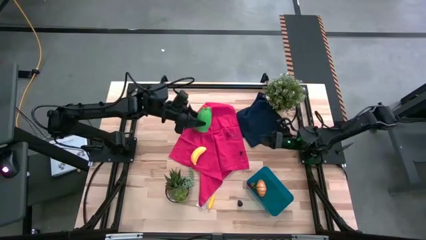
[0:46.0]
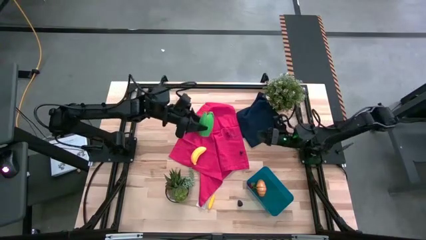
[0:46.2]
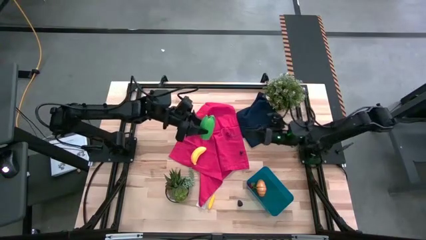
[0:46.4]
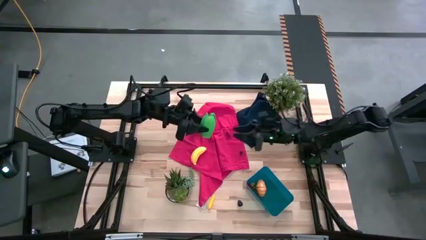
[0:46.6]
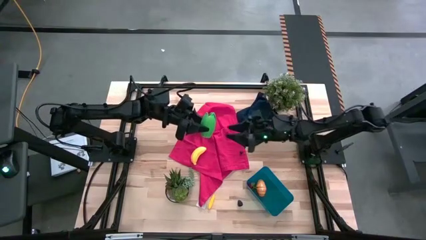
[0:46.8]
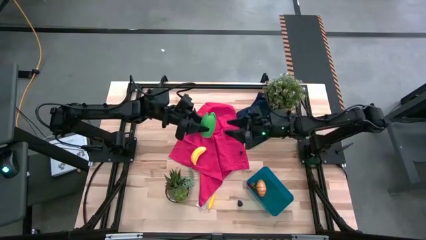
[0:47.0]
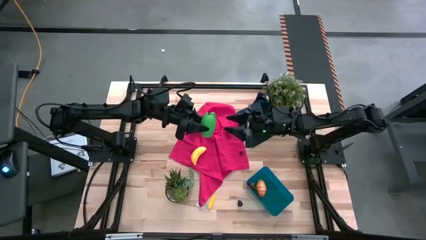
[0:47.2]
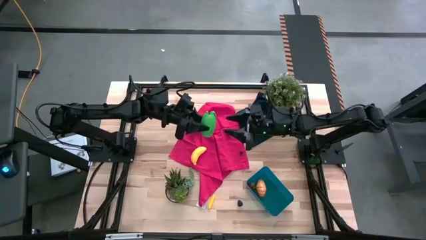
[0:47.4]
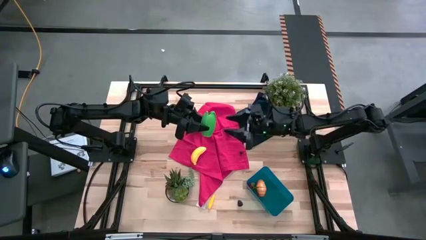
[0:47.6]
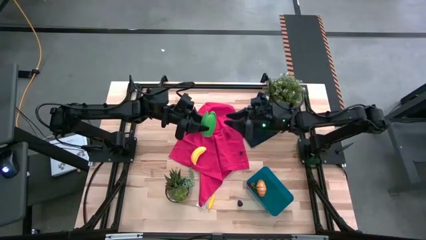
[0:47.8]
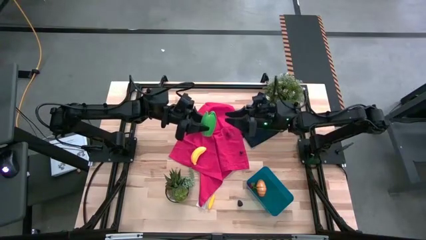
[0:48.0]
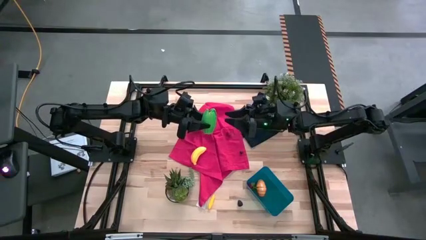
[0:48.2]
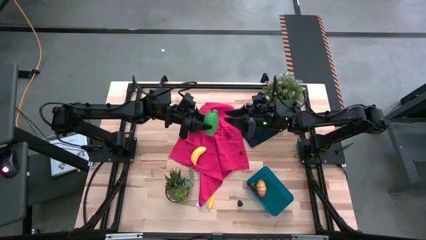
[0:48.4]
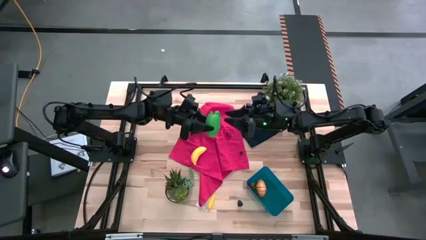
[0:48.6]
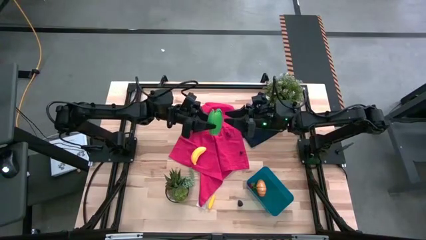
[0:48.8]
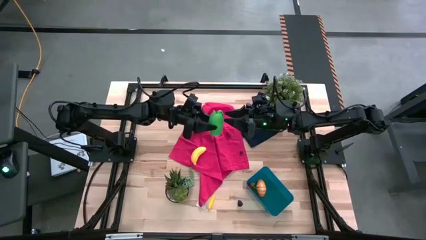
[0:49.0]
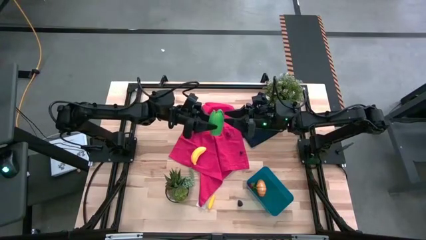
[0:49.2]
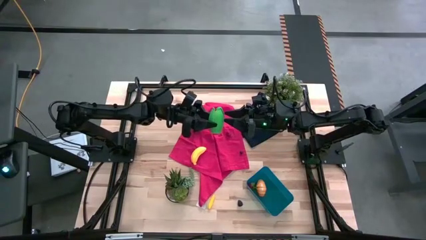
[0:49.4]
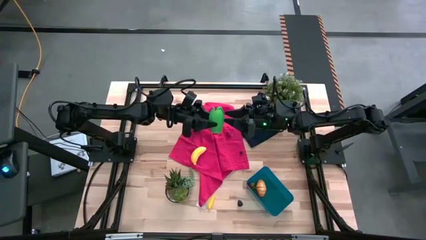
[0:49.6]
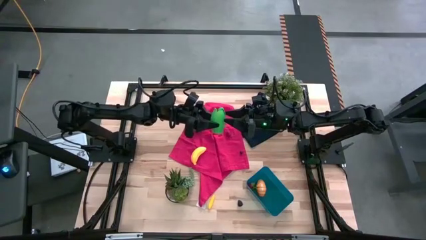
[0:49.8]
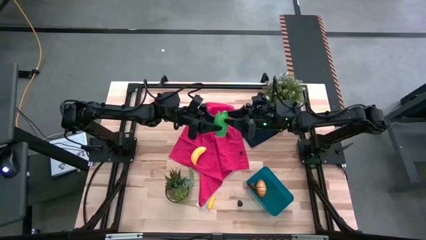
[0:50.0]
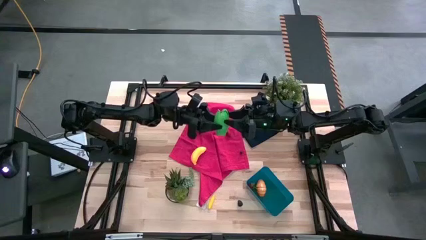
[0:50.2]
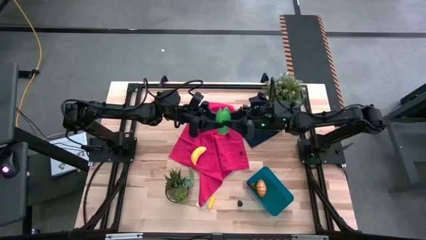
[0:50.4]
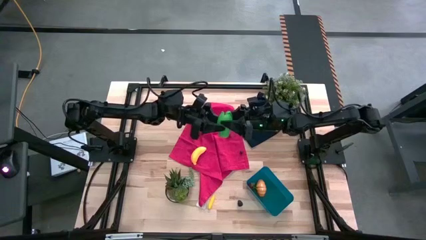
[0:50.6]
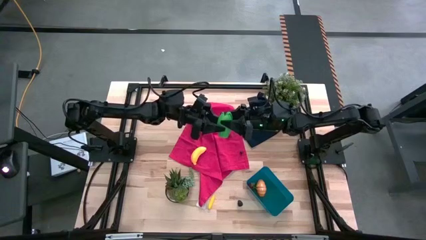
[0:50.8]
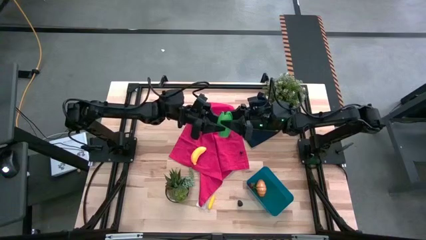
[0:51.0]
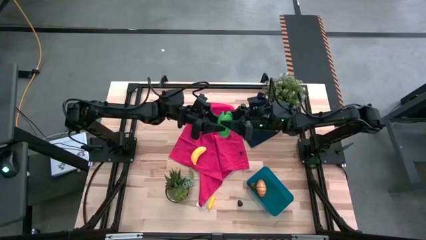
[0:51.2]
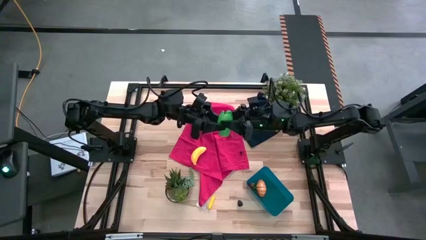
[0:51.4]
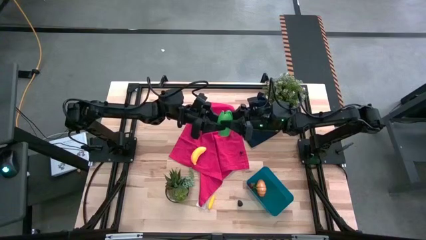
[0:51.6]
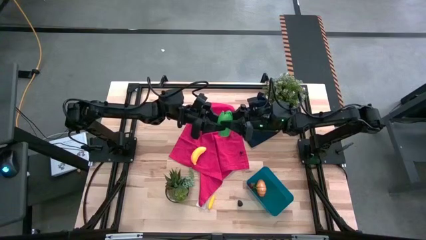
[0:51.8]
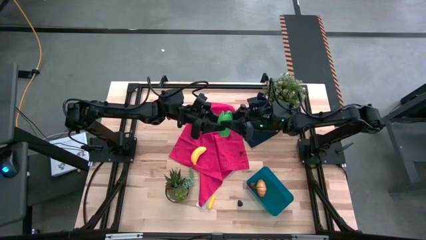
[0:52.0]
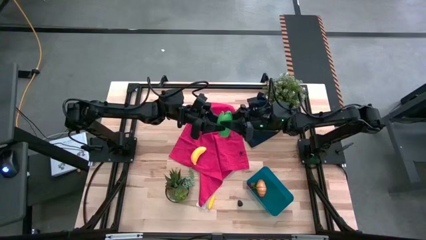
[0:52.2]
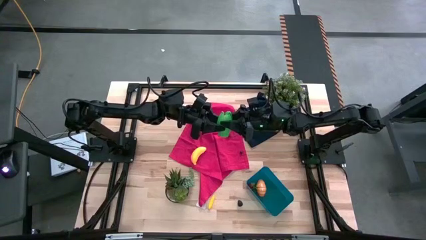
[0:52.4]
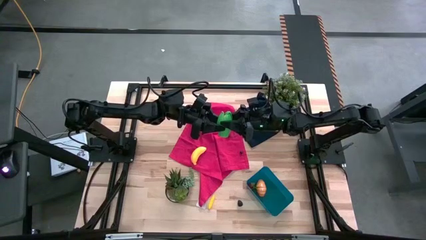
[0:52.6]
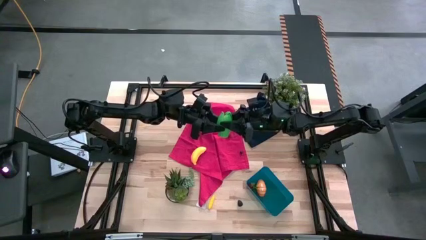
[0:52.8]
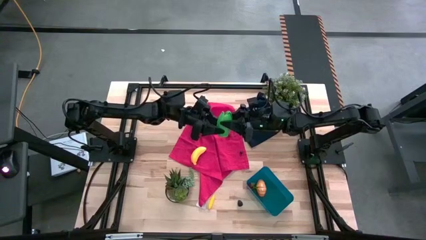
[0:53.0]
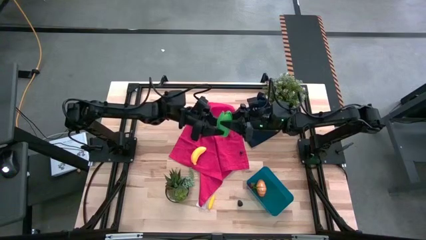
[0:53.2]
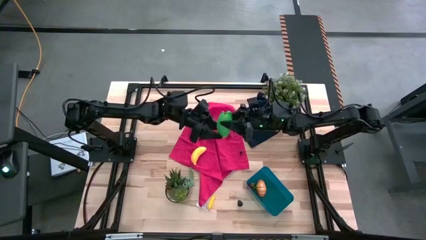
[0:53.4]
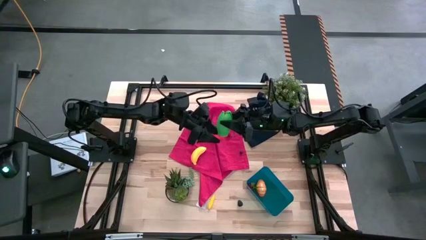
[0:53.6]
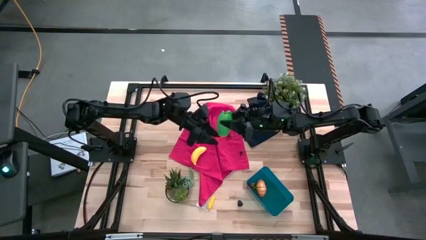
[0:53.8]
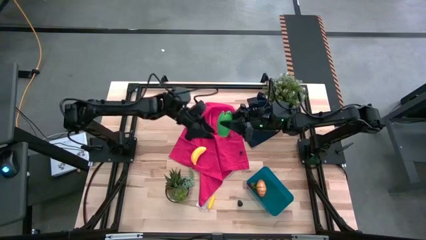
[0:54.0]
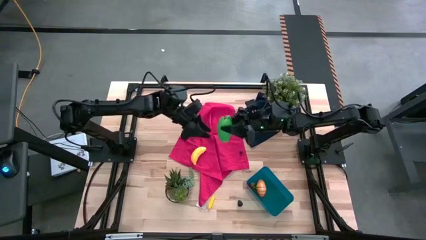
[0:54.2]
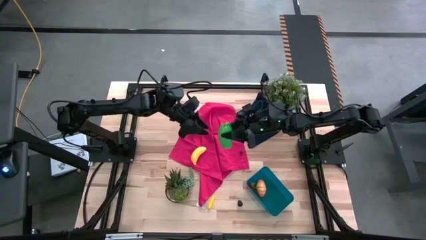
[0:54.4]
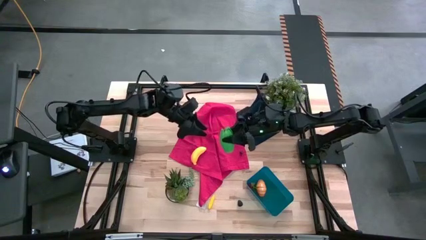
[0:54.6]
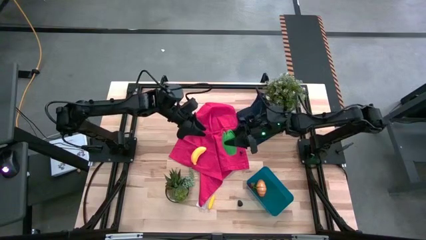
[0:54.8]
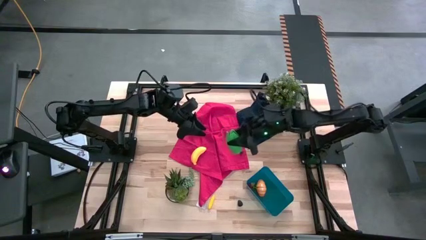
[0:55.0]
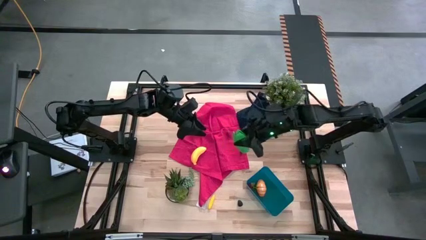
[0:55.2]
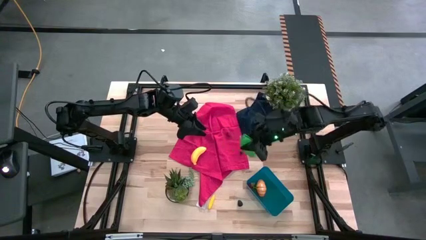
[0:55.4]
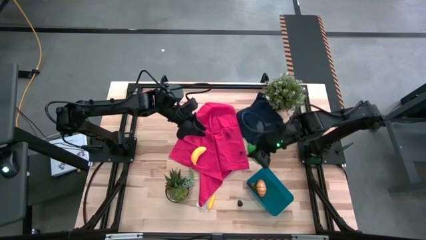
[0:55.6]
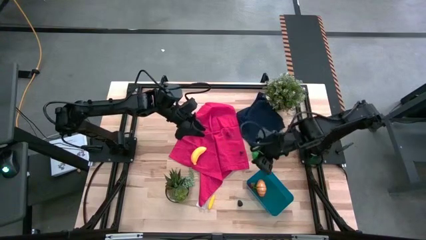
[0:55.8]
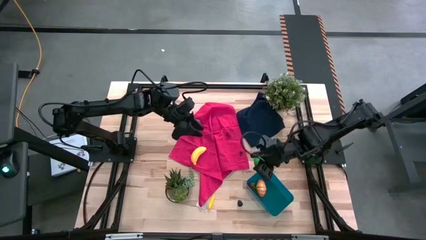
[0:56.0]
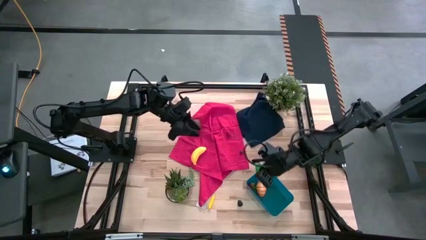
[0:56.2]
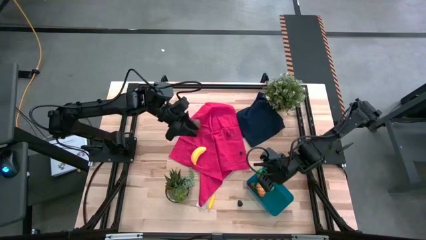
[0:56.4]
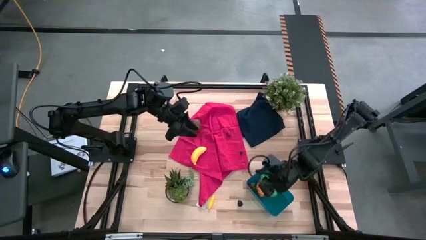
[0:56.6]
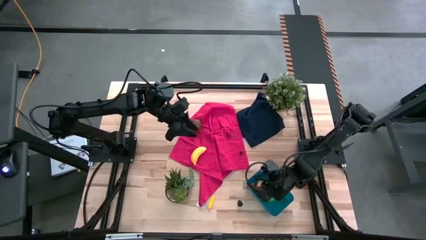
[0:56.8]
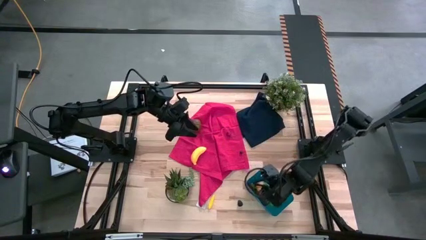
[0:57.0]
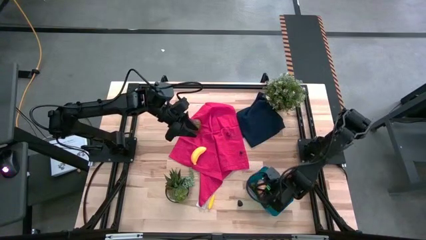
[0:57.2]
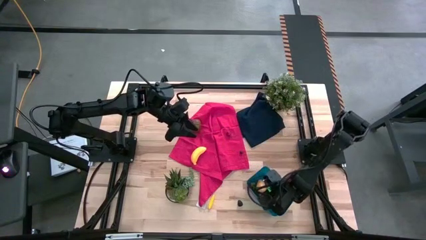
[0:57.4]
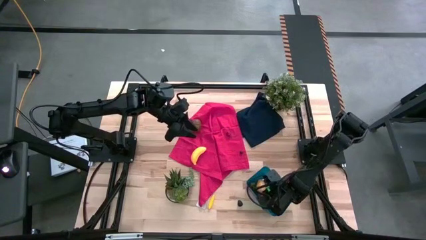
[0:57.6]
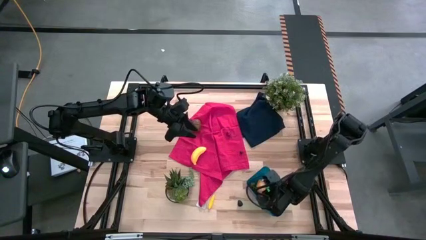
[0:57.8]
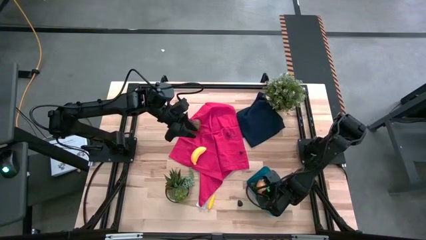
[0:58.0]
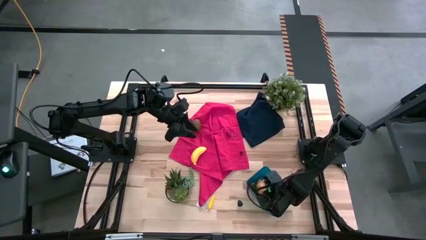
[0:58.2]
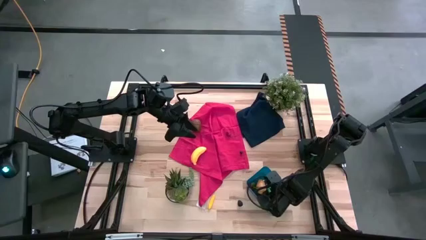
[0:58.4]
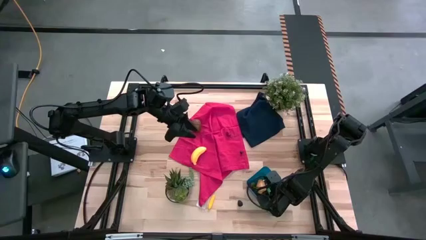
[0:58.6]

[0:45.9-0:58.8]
Task: Pick and placing Produce into tupperware
Put the green corn into the blue bin
